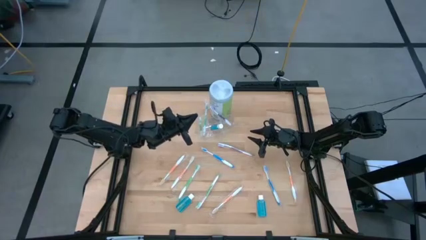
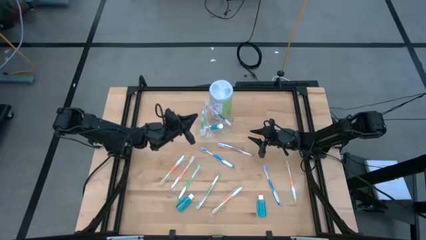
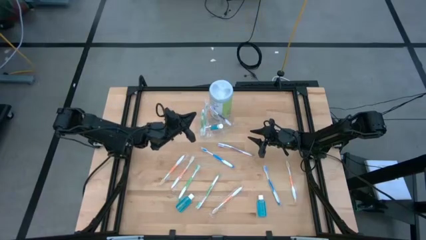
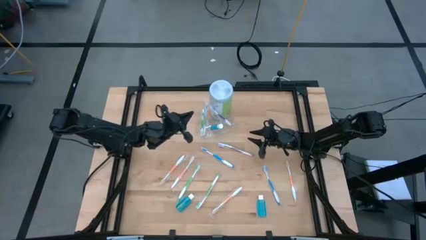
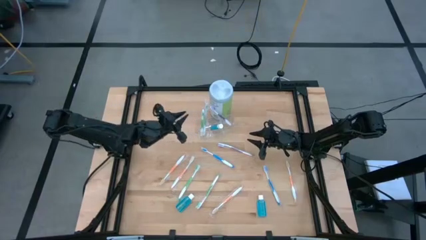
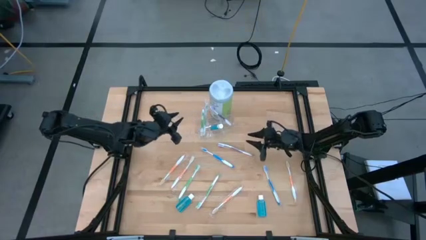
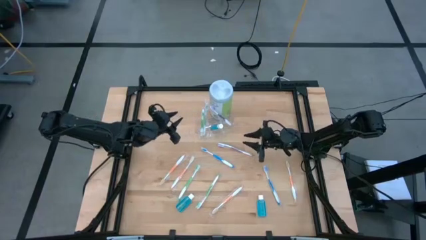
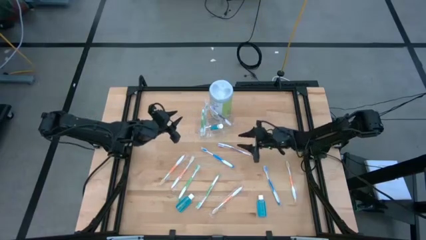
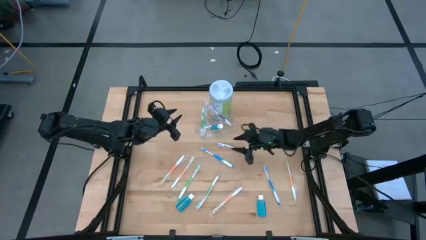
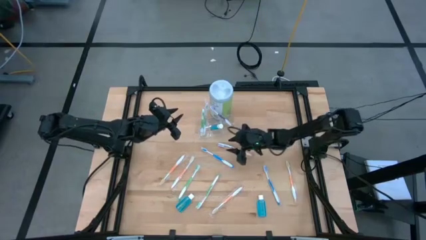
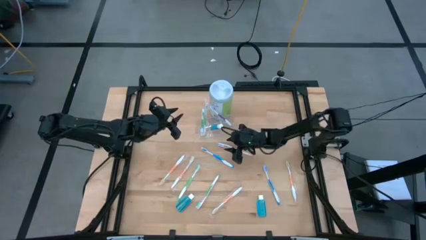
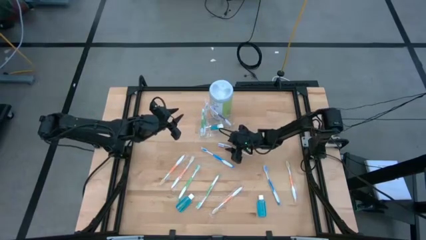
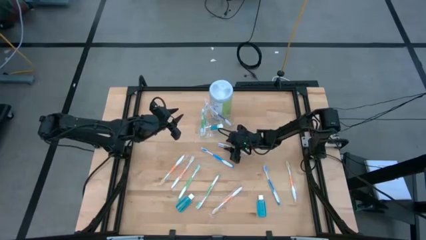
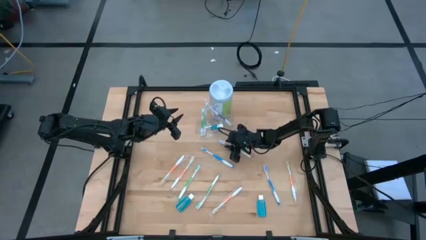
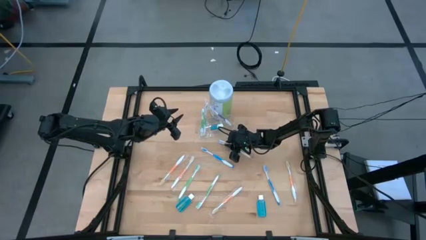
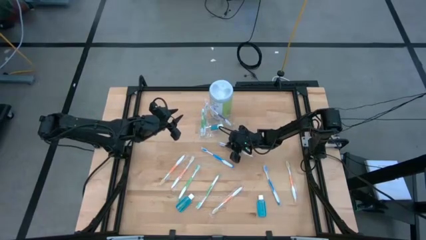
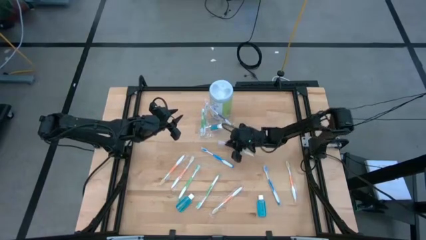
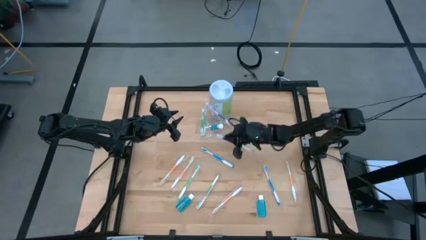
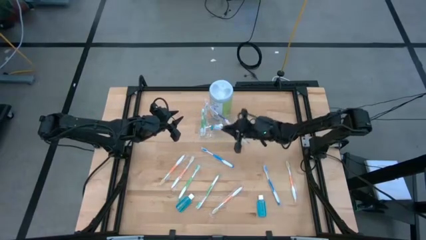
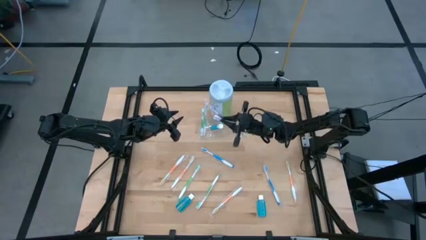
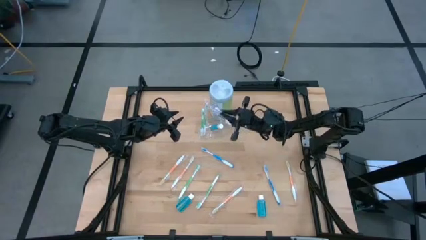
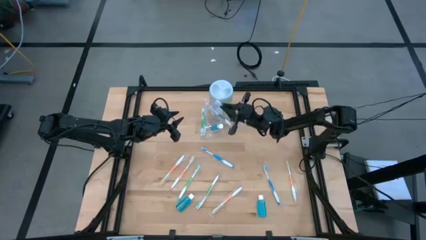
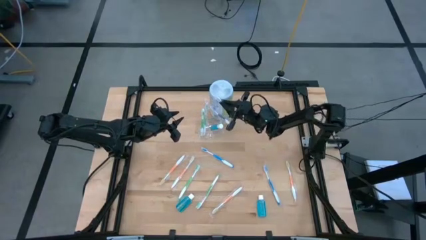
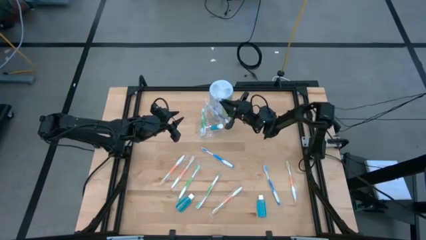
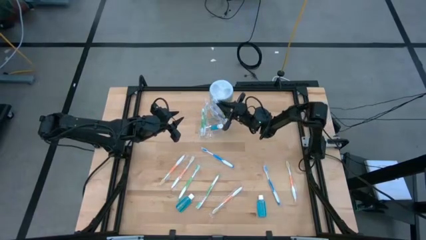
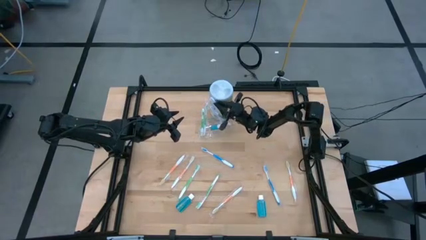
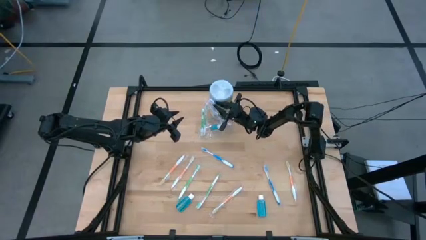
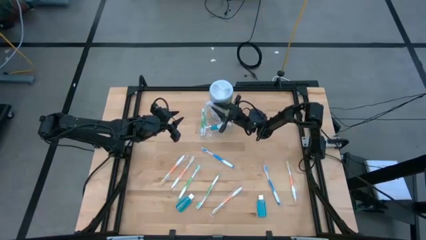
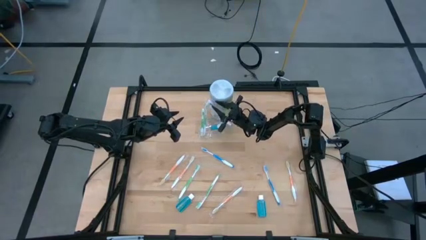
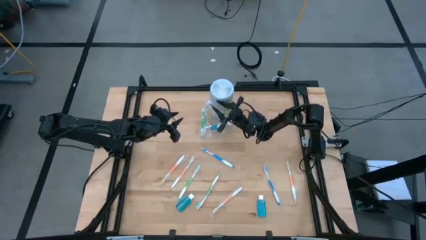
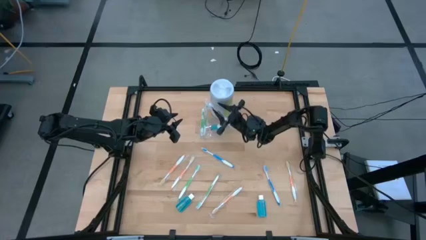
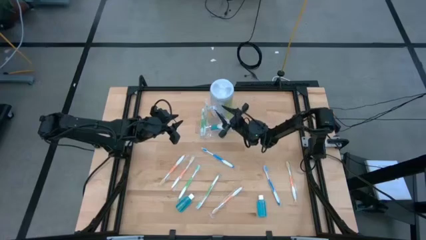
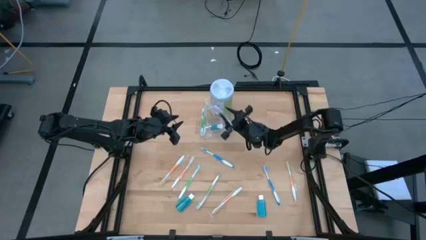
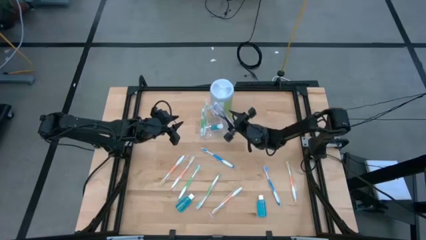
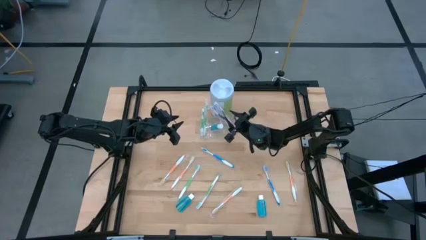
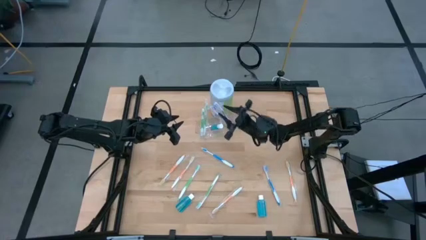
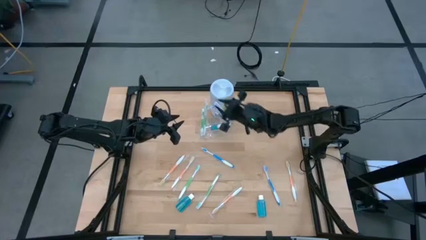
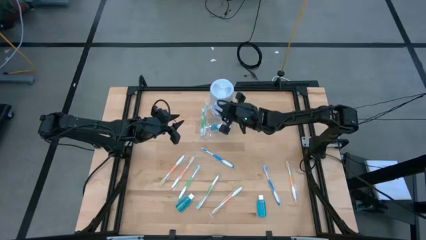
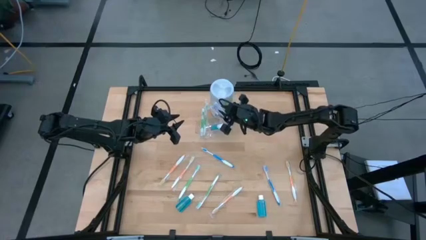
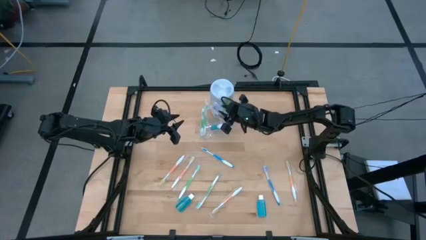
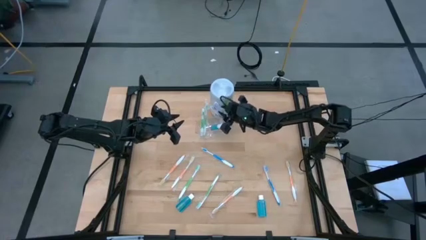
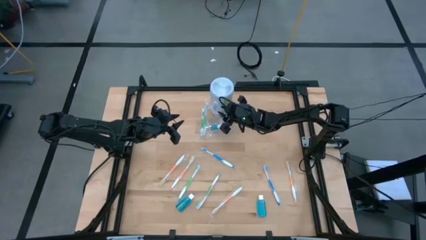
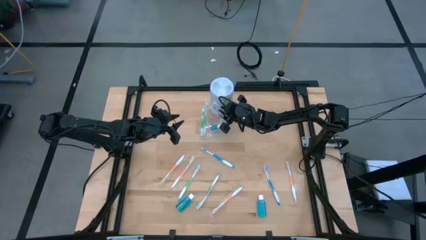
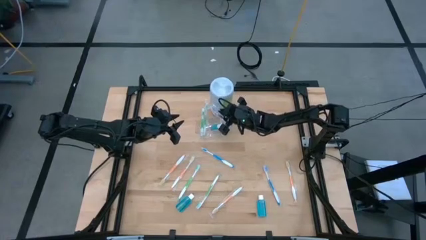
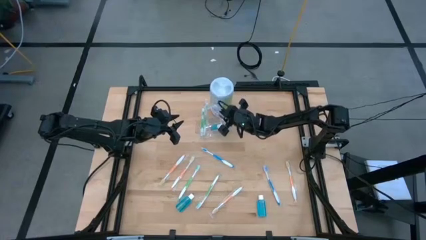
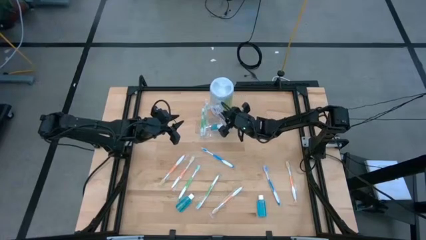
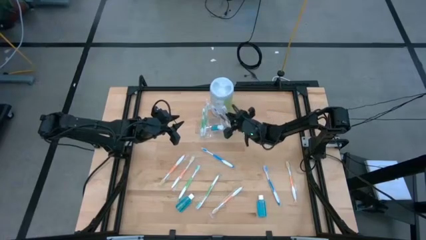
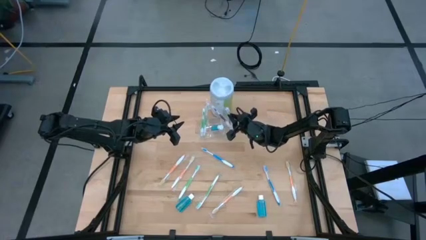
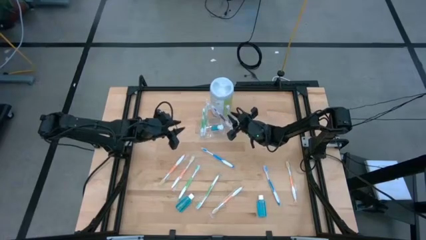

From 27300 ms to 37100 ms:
Task: Pick & Place toothbrushing station
Put the violet toothbrush into the transparent organizer

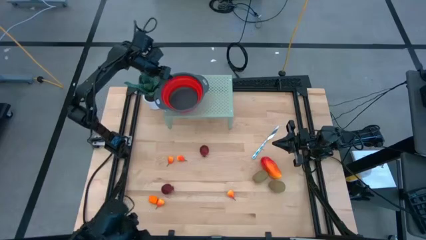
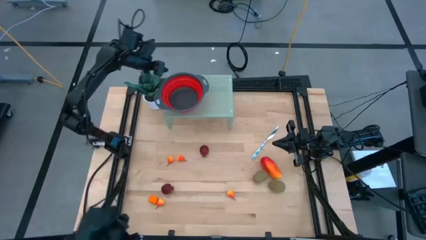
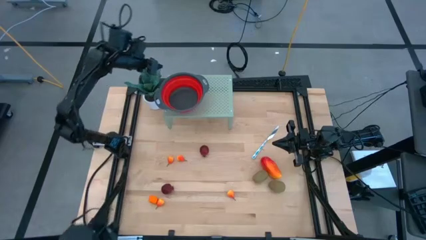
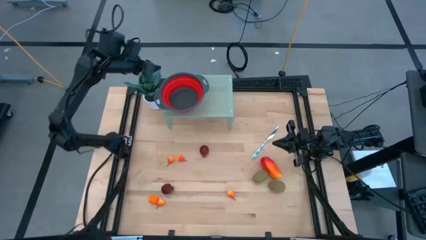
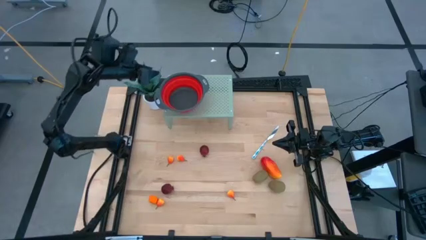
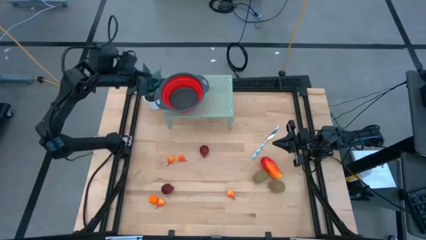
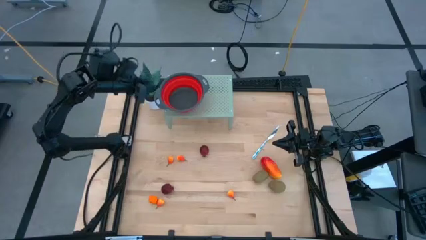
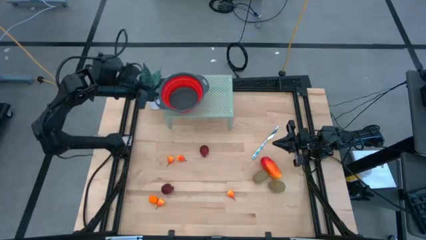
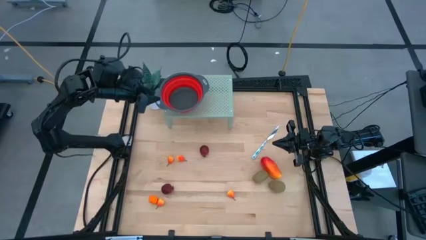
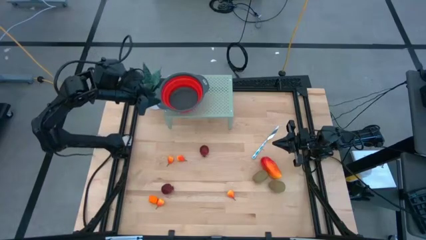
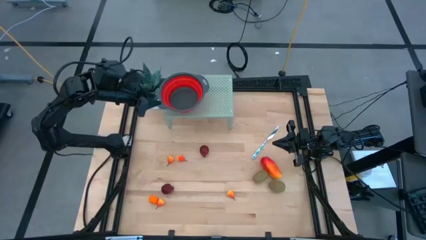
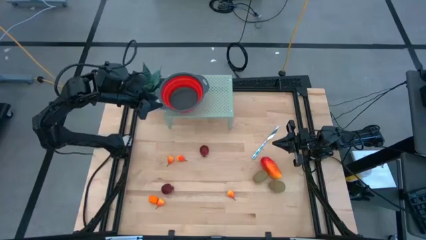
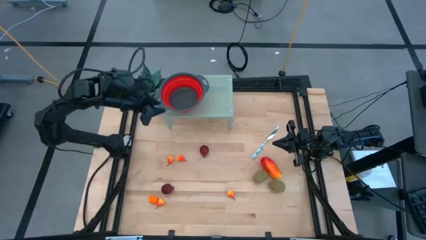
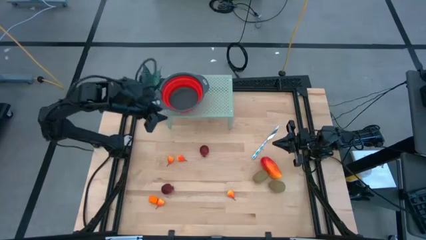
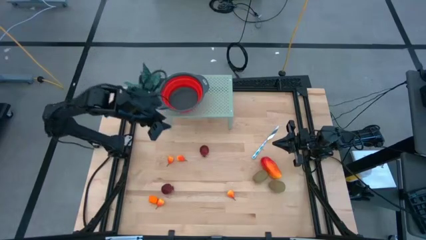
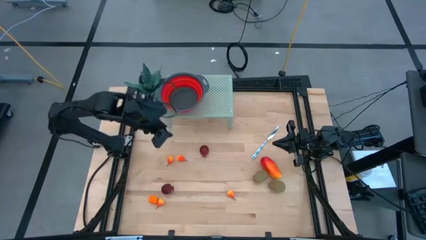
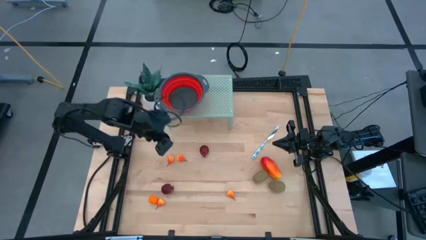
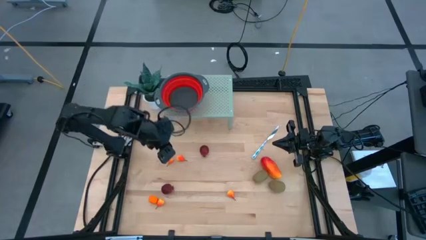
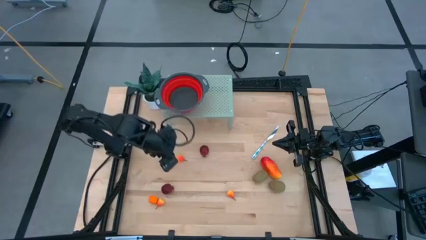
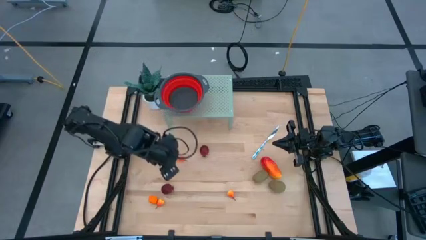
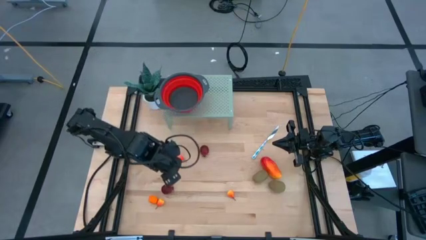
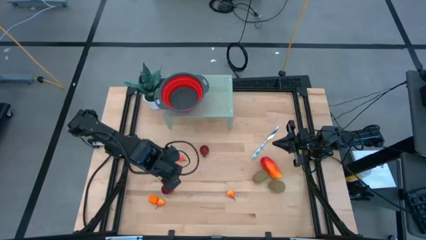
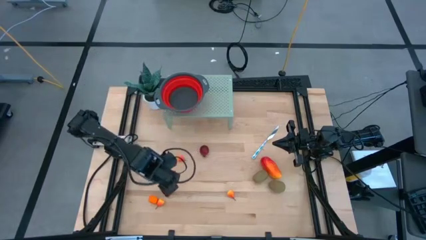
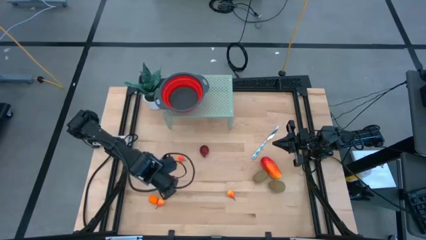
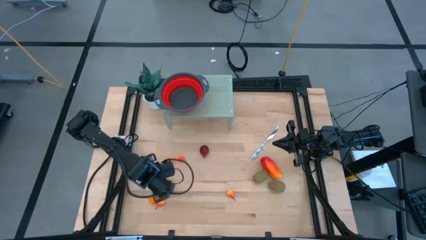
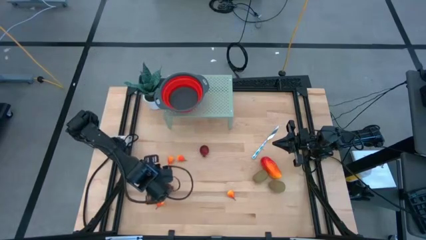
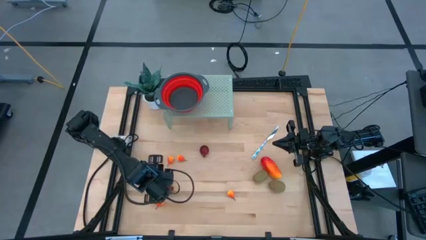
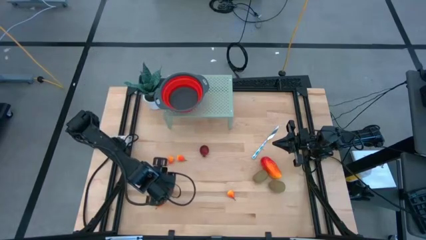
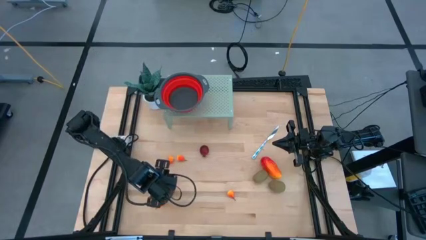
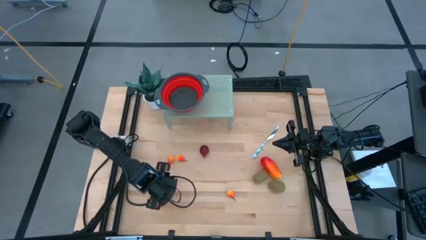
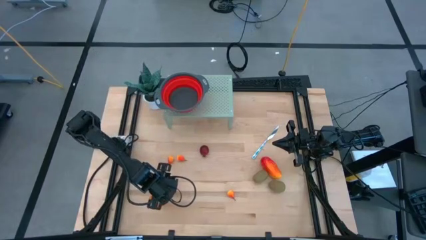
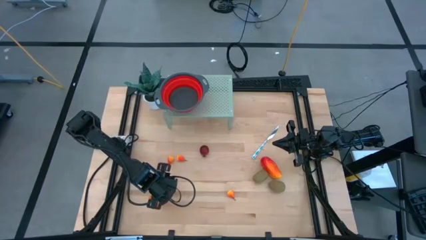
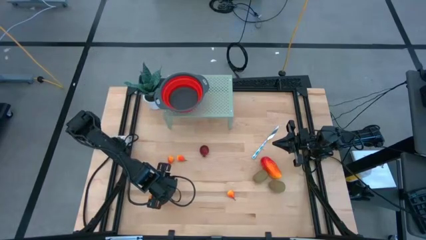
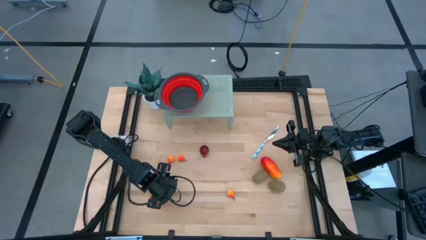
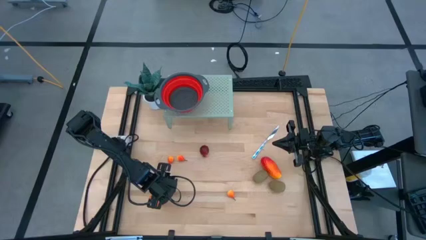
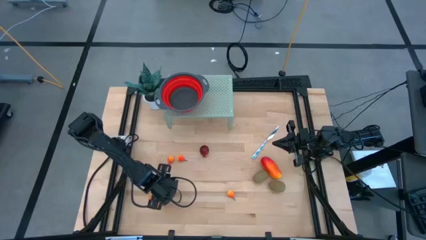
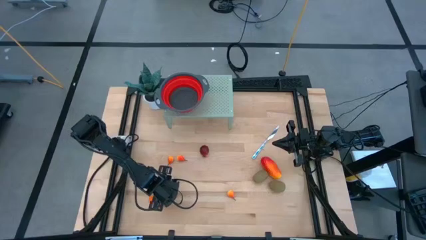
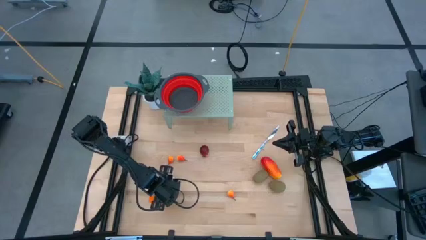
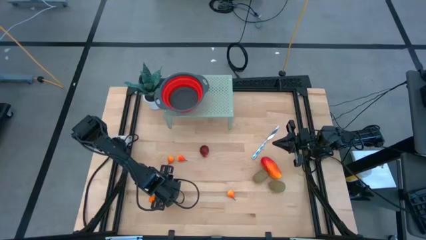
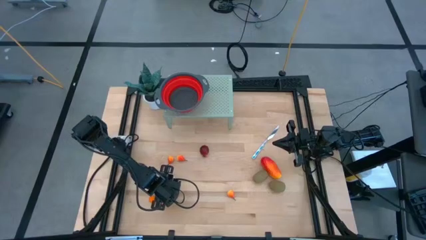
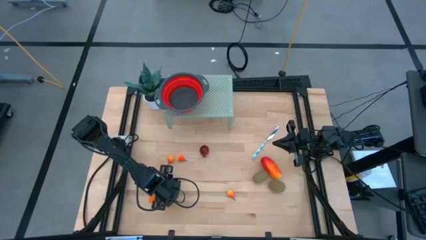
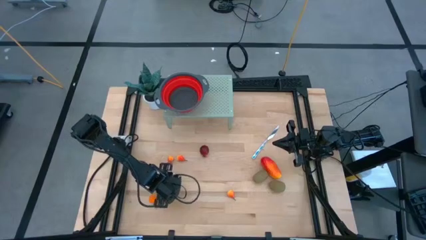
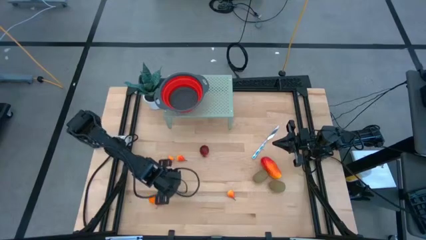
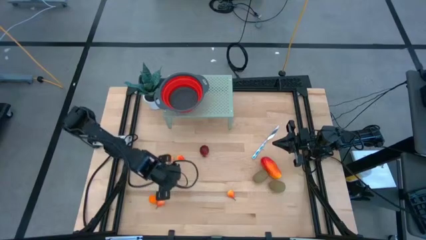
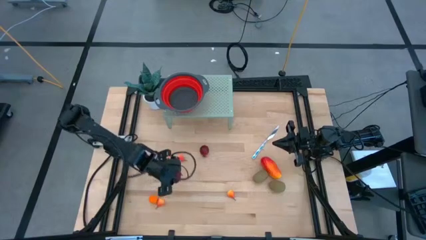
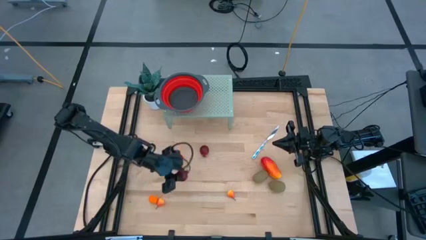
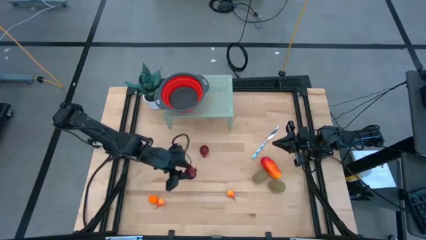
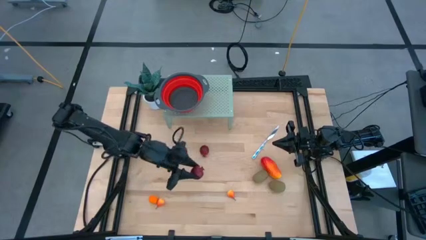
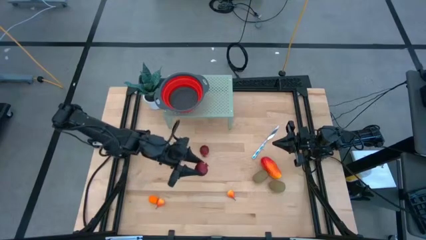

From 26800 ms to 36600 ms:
Task: Pick & Place Fruit
Put the pomegranate into the red strainer bowl on the shelf
